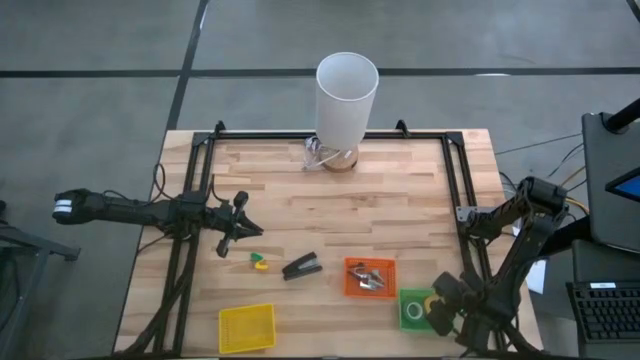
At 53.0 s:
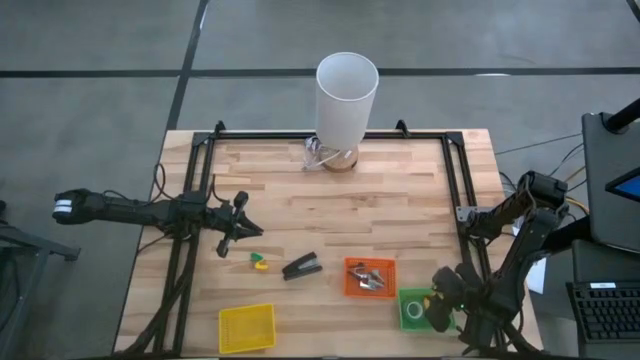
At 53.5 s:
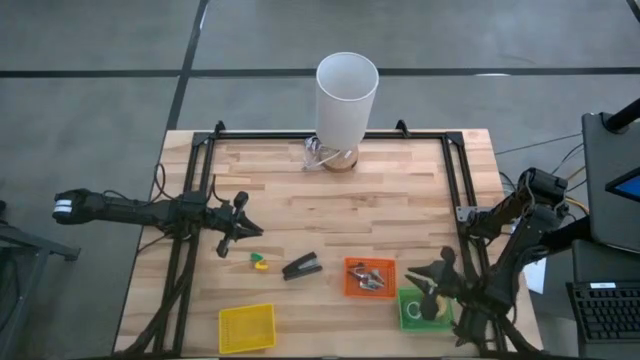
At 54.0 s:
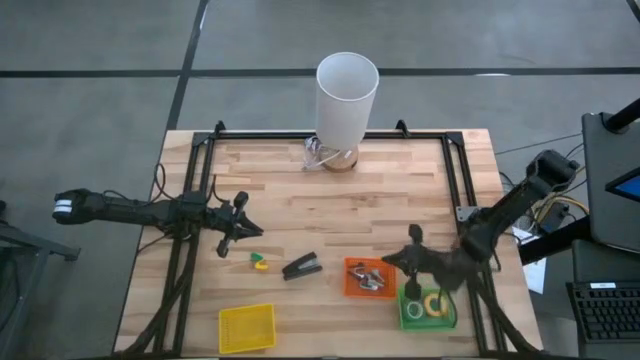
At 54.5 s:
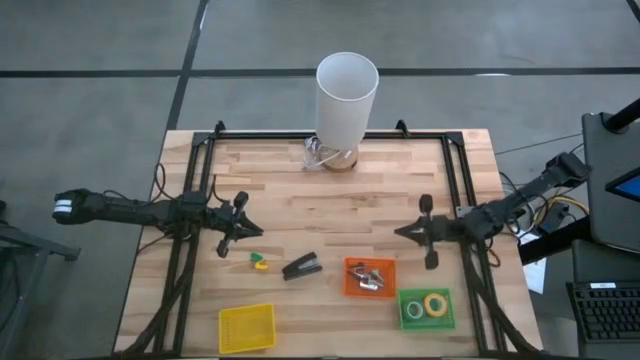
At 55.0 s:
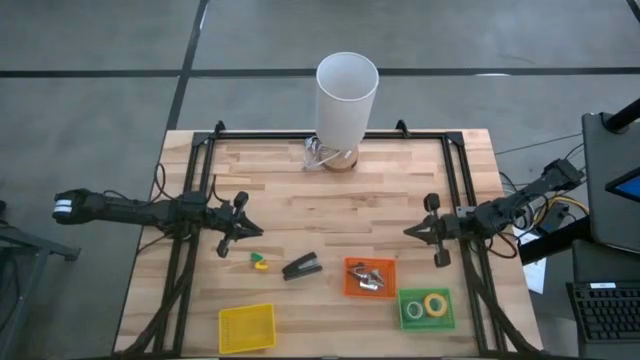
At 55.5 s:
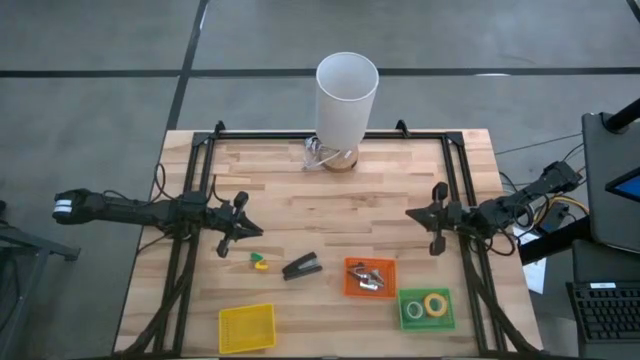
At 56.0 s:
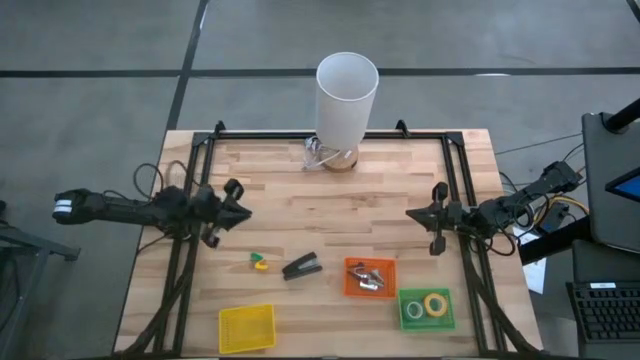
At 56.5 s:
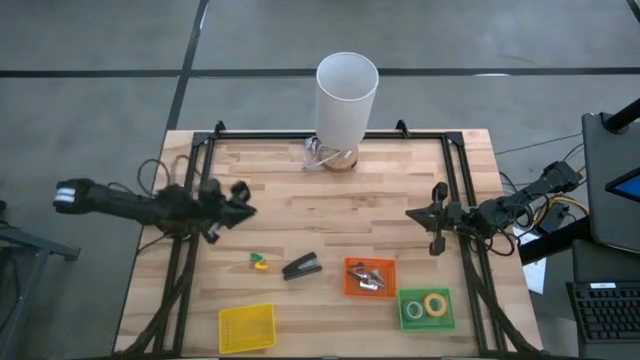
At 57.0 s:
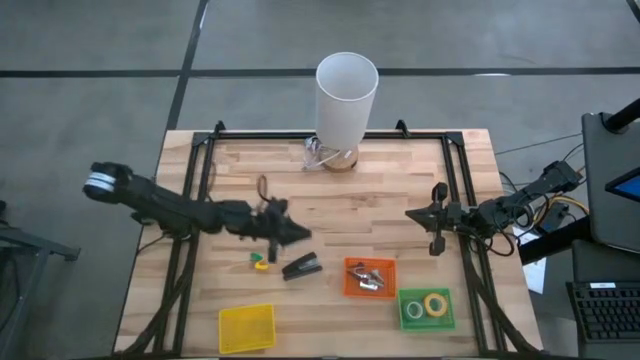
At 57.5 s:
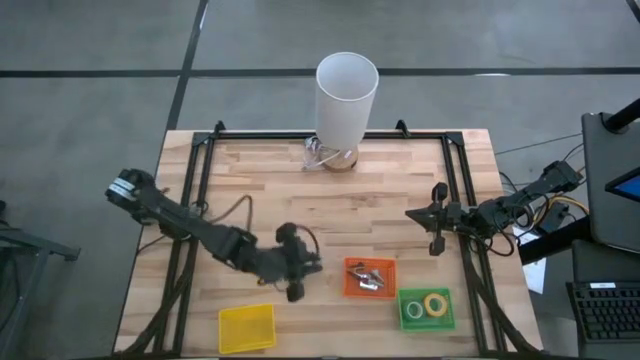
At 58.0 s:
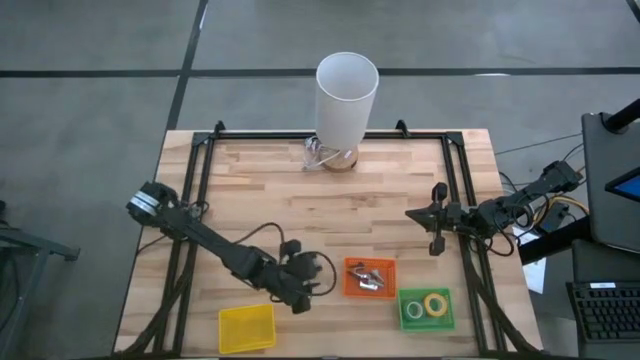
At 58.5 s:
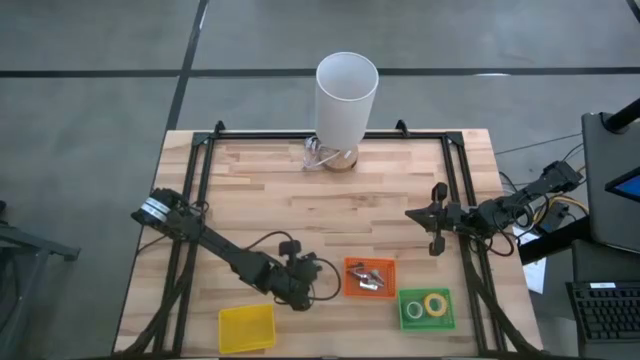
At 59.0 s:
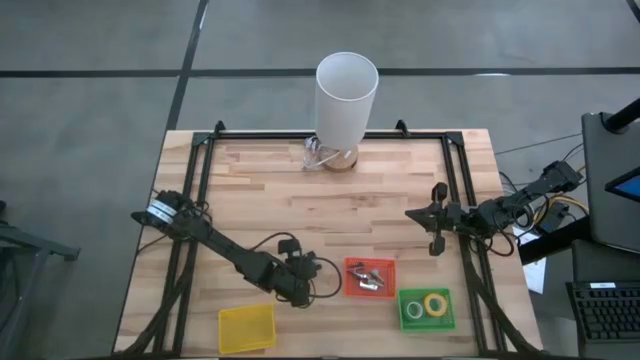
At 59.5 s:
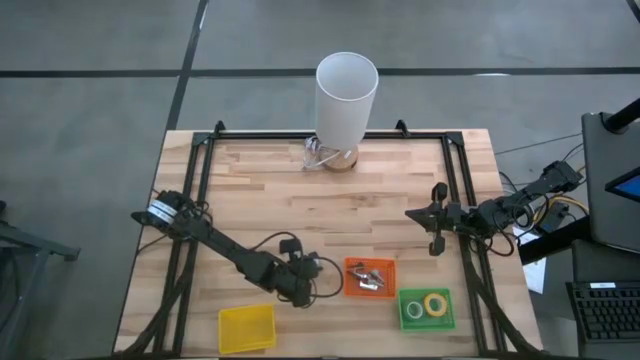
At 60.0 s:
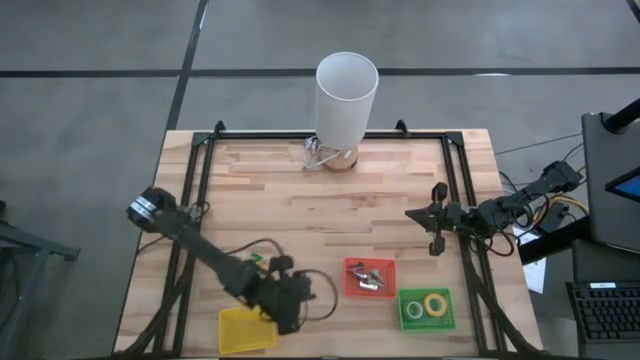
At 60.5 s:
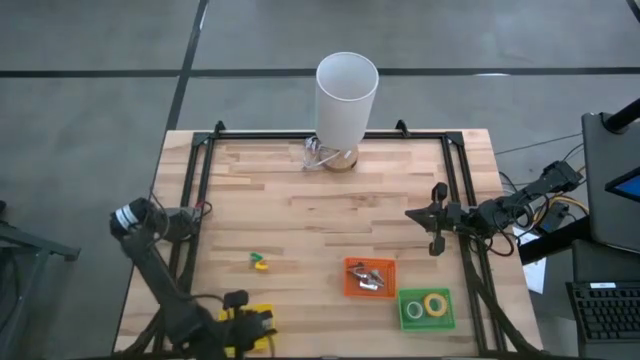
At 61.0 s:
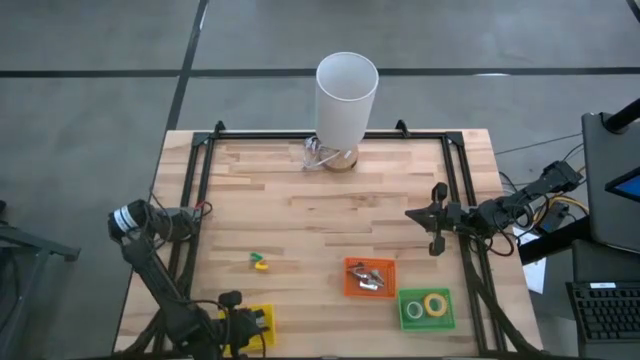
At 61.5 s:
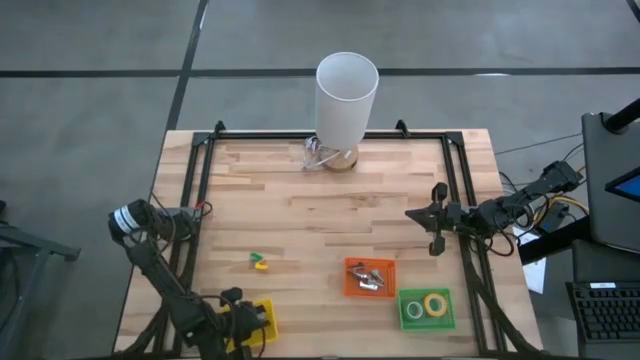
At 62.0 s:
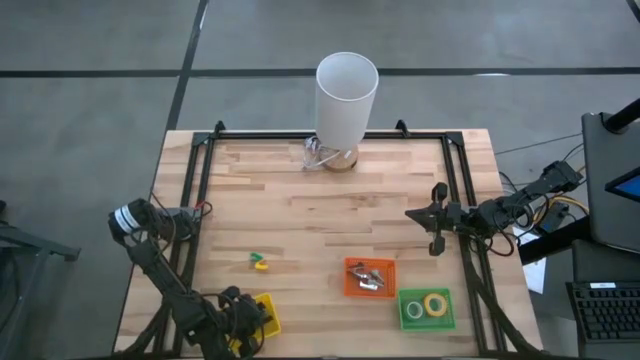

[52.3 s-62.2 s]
Task: Pick and place Stapler, Stapler remover, tape
Put the black stapler into the yellow basket

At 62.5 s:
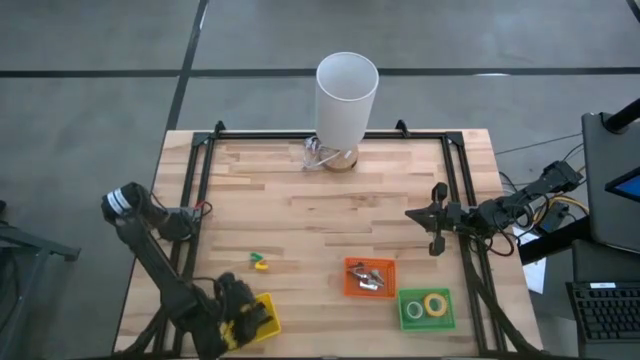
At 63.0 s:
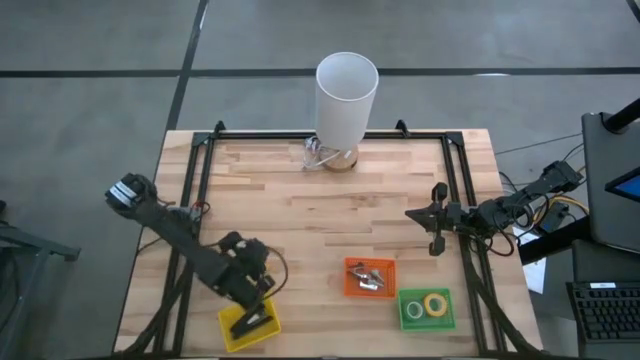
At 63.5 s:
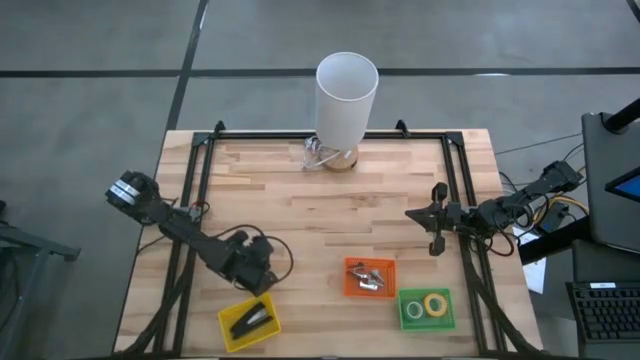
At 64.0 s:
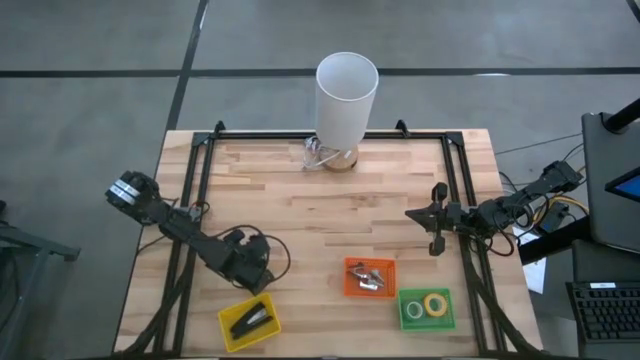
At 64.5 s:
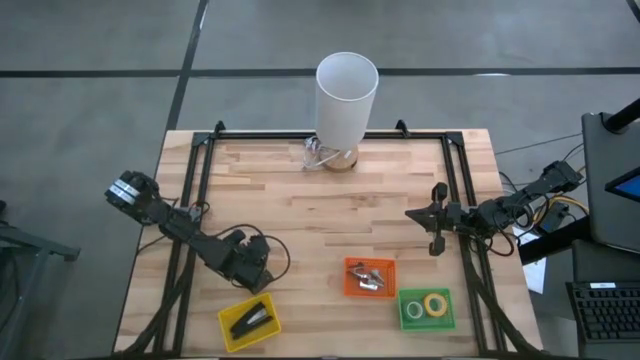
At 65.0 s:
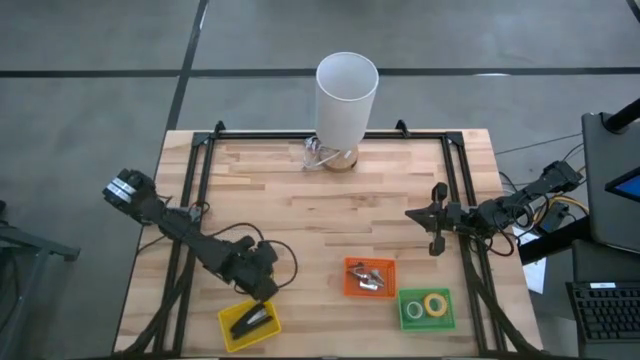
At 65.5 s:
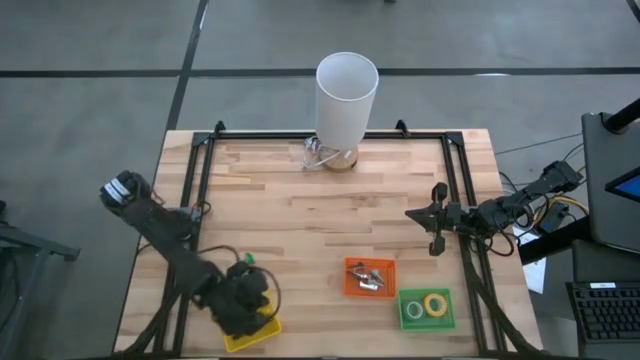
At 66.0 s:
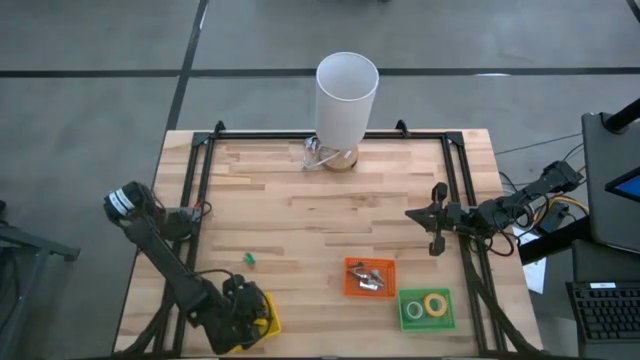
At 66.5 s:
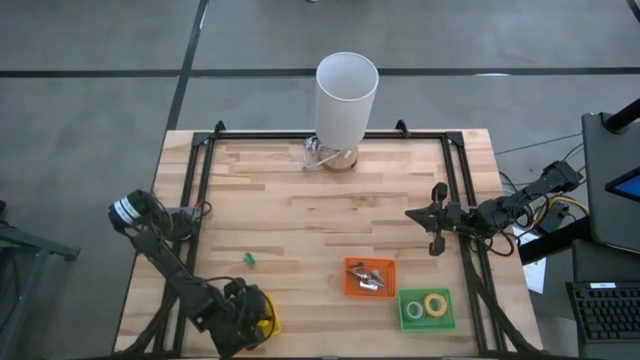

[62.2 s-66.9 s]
Put the yellow stapler into the yellow basket

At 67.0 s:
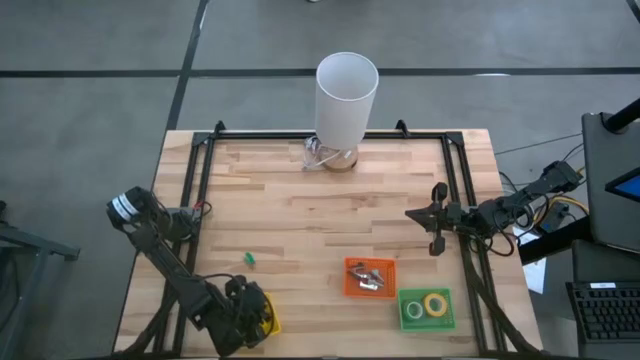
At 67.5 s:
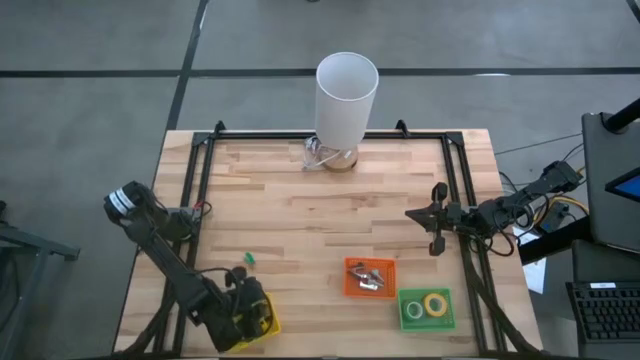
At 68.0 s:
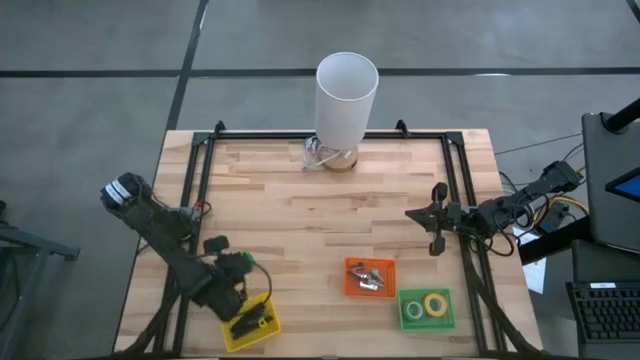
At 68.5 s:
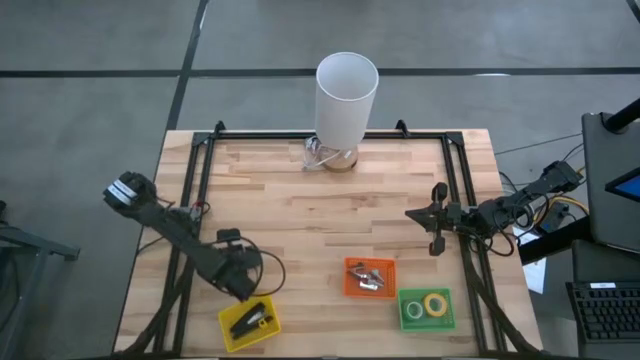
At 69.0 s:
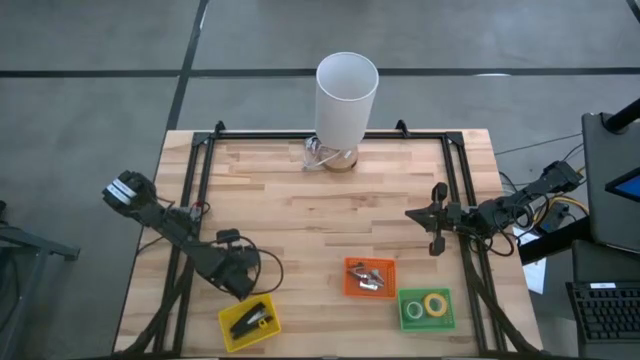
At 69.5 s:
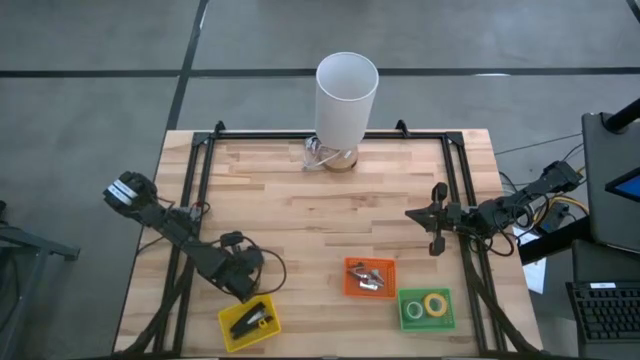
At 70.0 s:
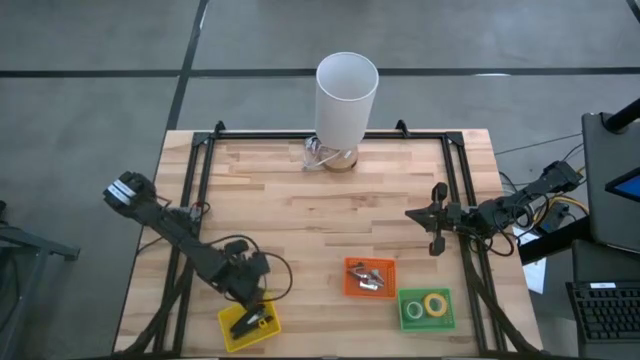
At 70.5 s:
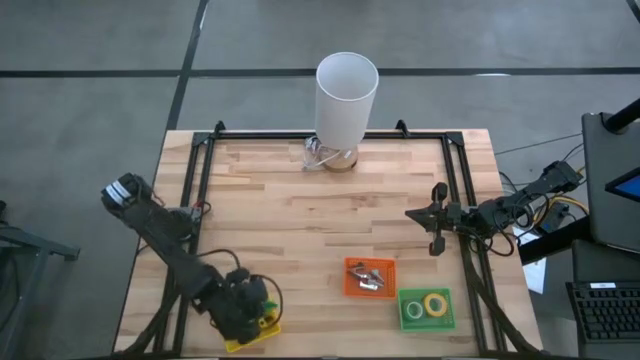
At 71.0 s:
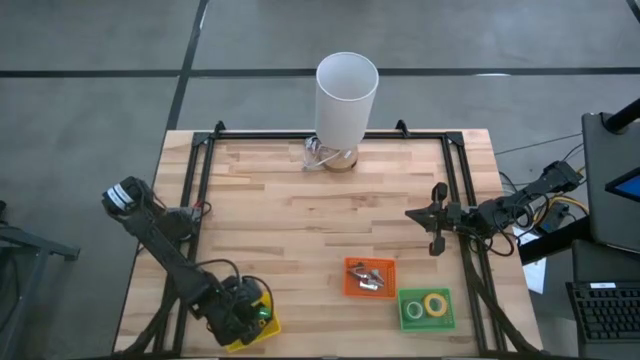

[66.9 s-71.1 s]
Put the green stapler into the yellow basket

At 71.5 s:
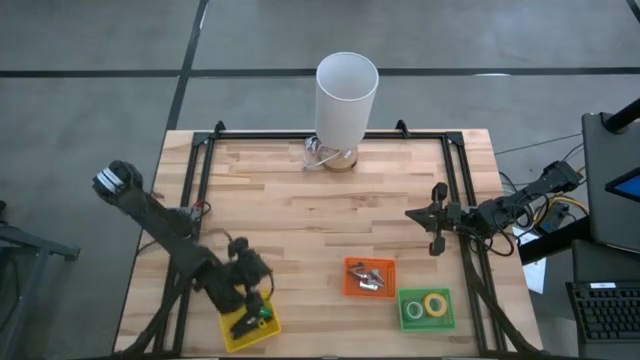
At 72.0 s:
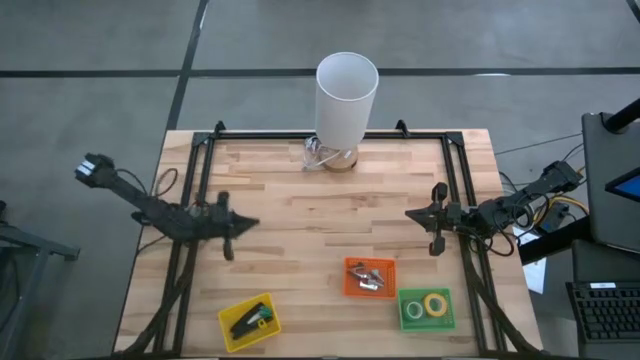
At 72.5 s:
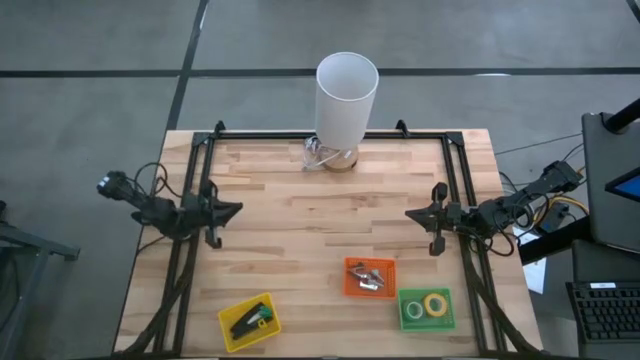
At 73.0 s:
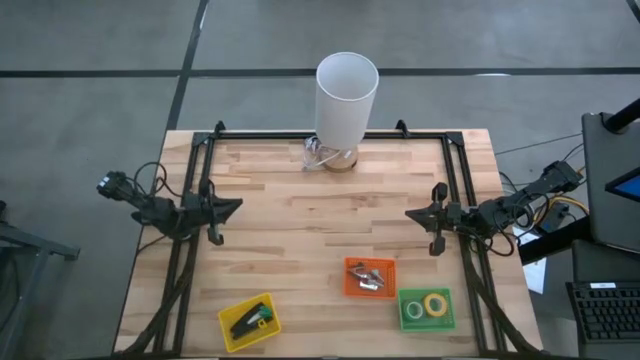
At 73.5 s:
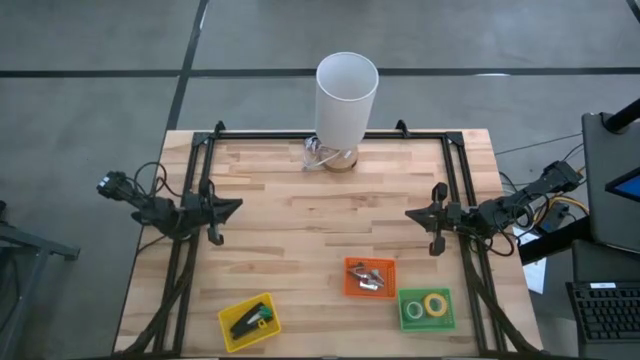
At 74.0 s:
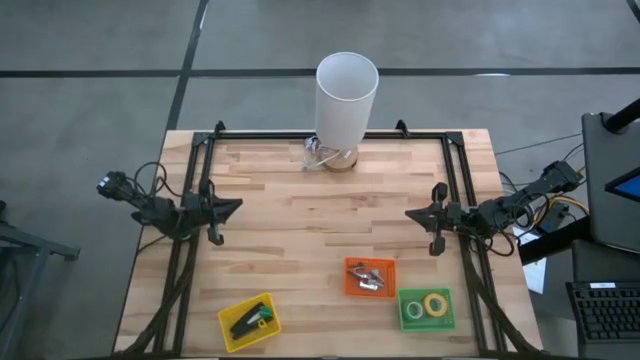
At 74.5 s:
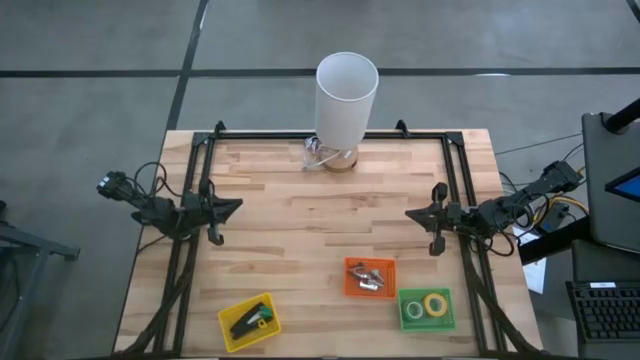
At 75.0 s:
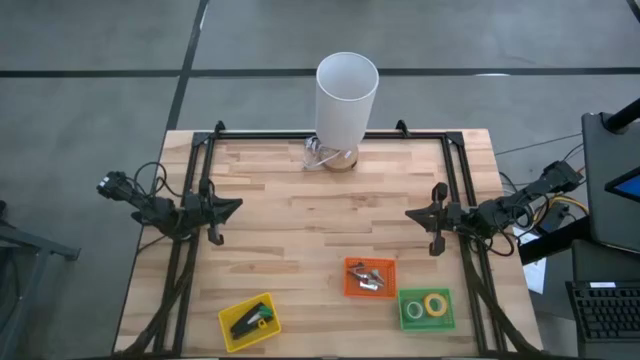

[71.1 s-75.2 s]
Return to Home Position
